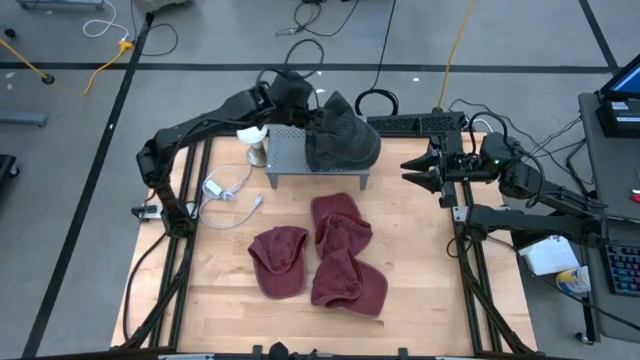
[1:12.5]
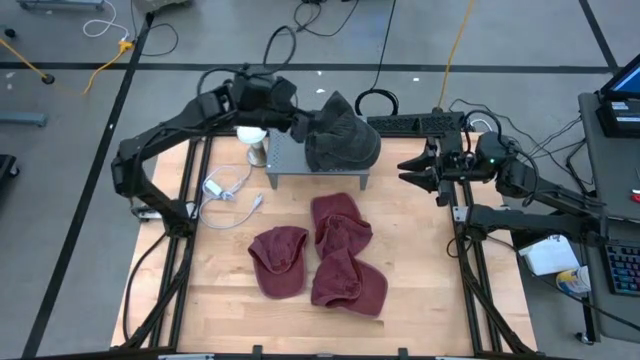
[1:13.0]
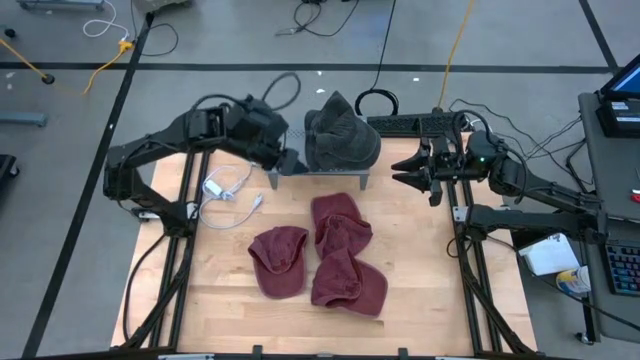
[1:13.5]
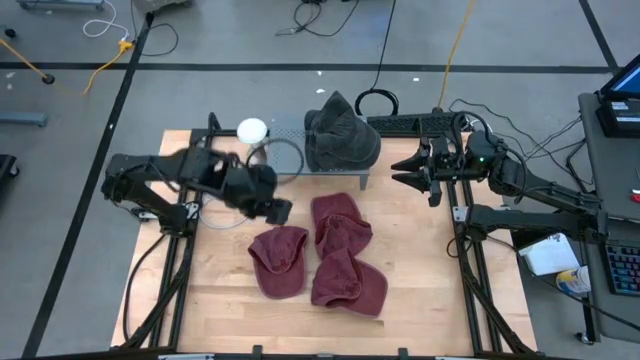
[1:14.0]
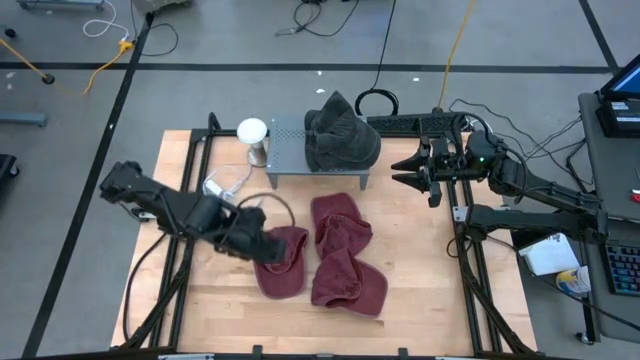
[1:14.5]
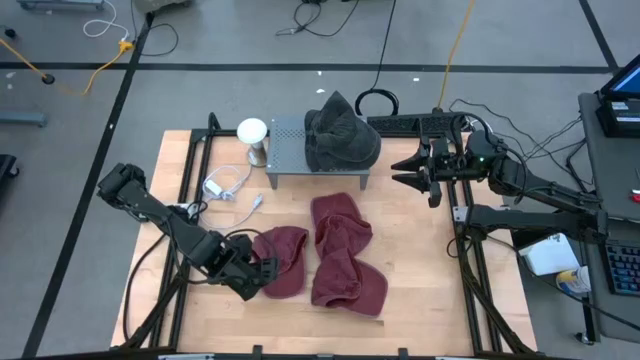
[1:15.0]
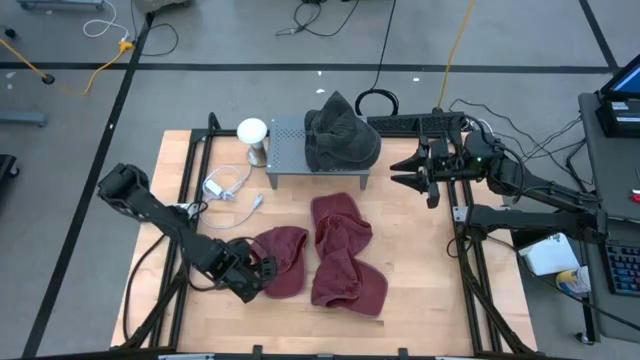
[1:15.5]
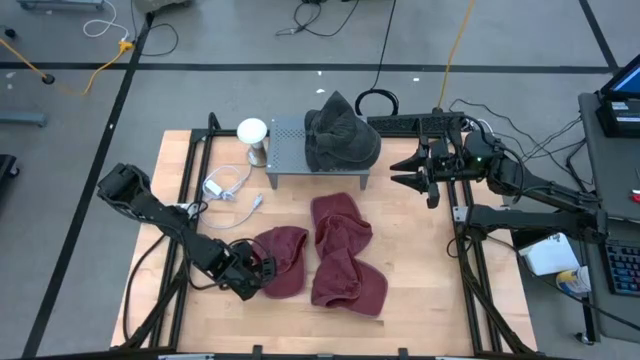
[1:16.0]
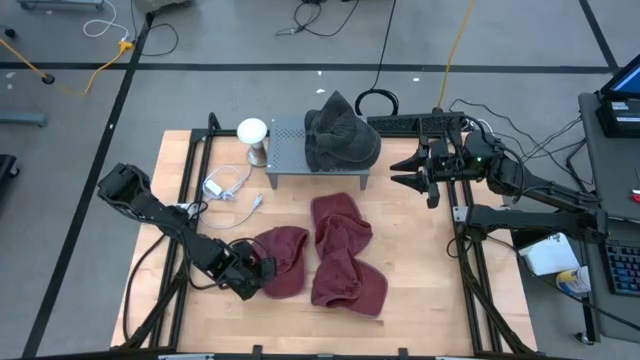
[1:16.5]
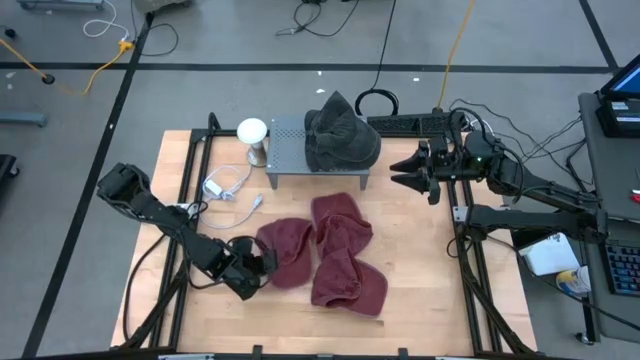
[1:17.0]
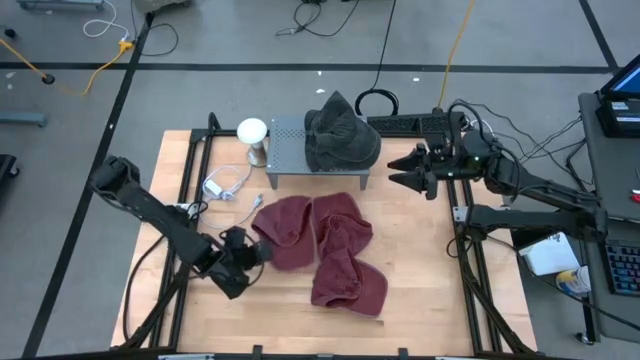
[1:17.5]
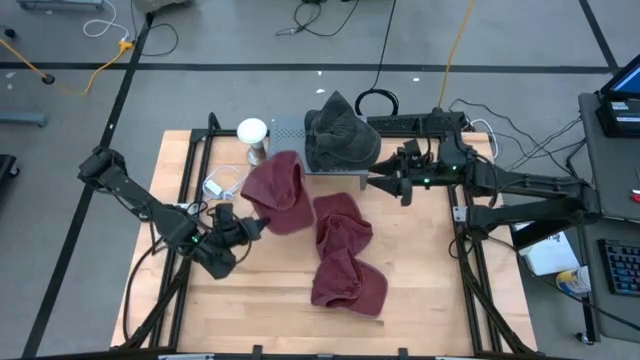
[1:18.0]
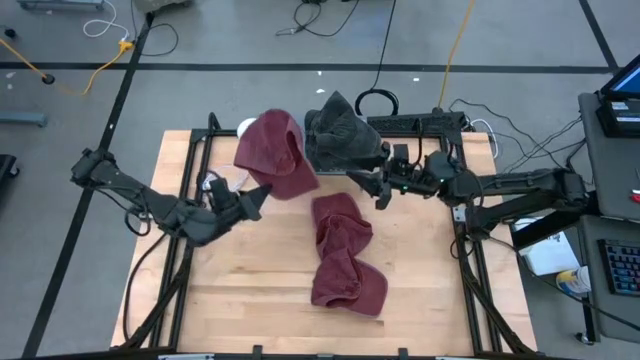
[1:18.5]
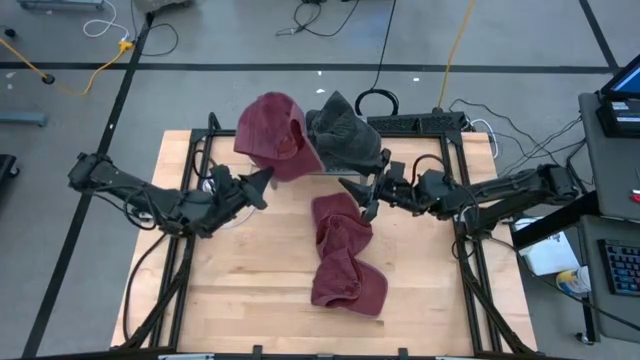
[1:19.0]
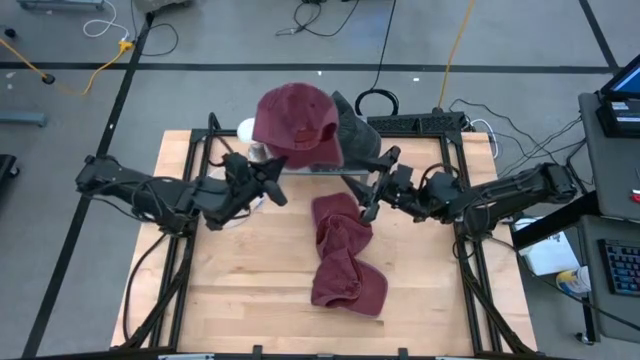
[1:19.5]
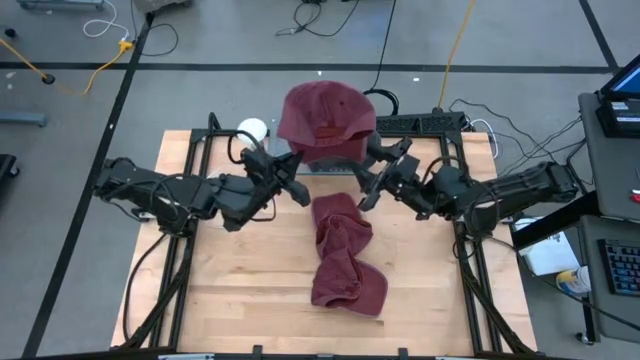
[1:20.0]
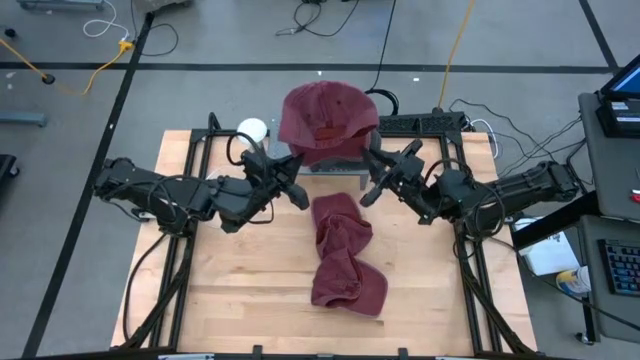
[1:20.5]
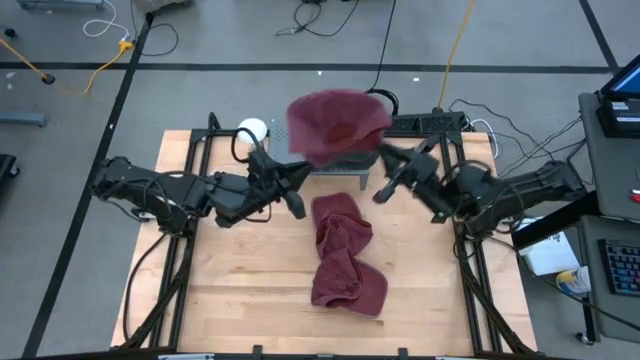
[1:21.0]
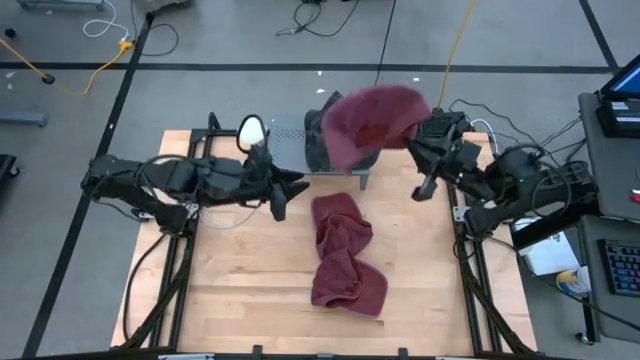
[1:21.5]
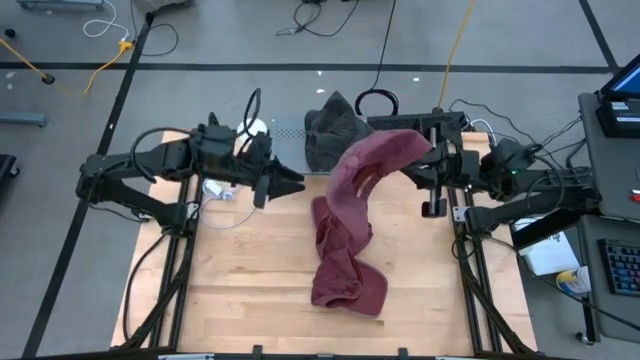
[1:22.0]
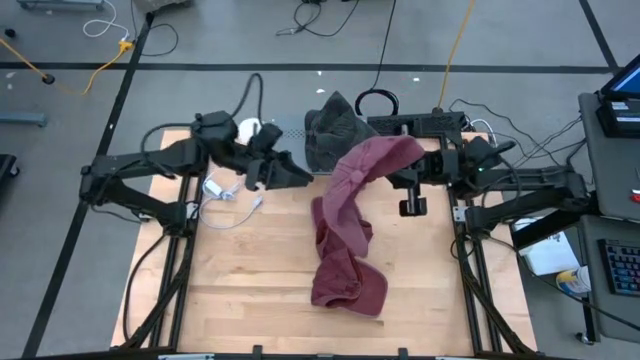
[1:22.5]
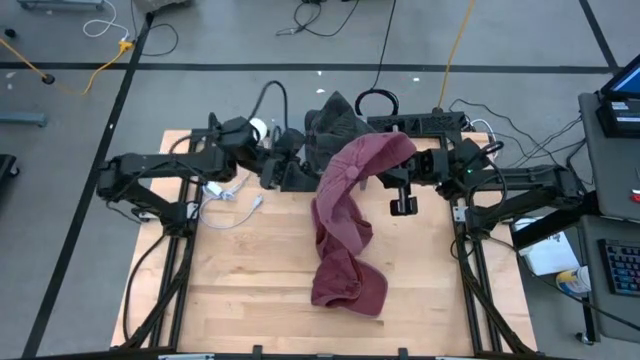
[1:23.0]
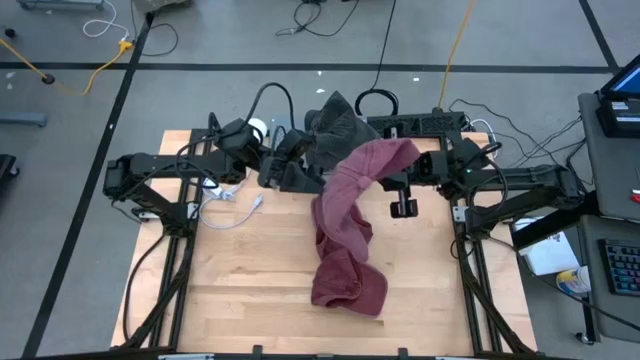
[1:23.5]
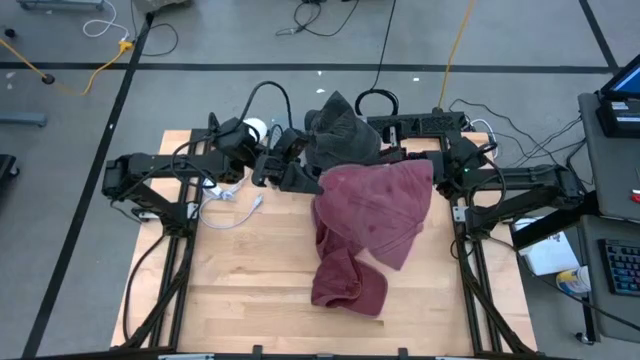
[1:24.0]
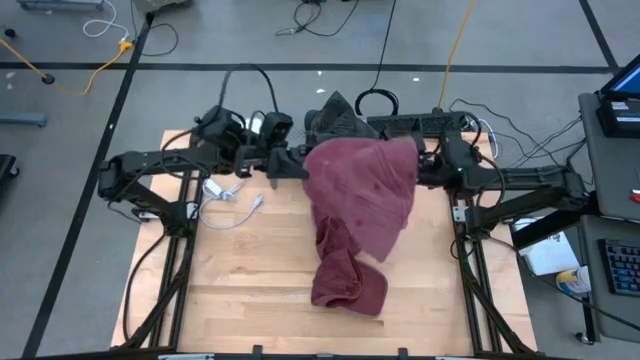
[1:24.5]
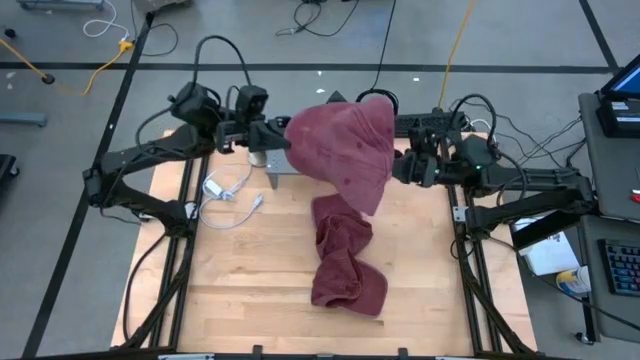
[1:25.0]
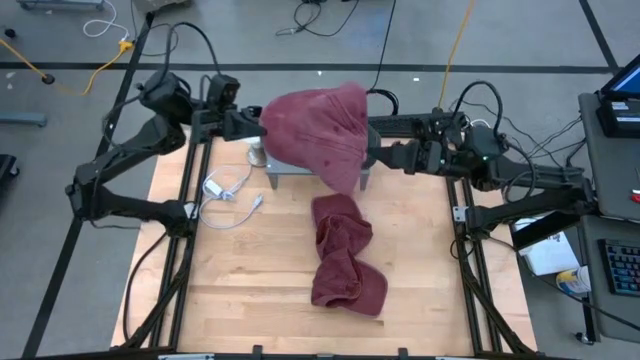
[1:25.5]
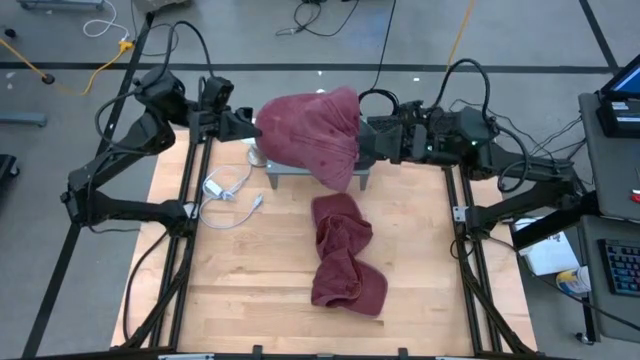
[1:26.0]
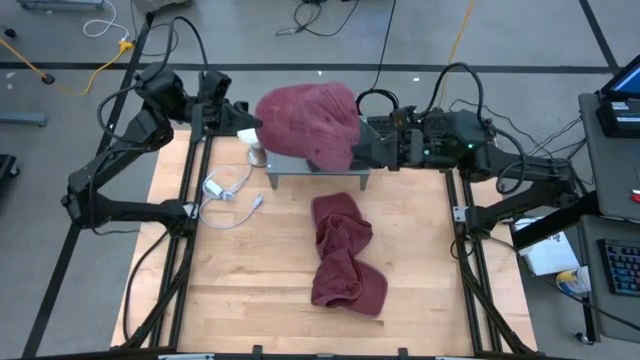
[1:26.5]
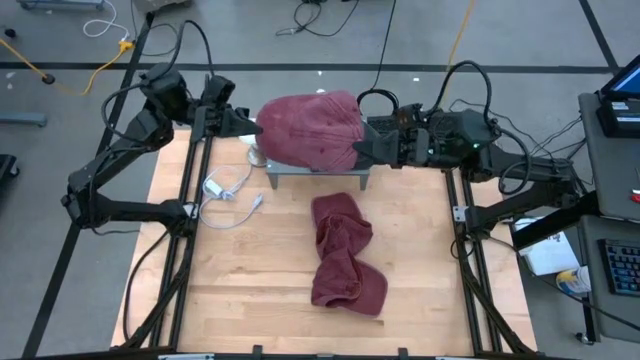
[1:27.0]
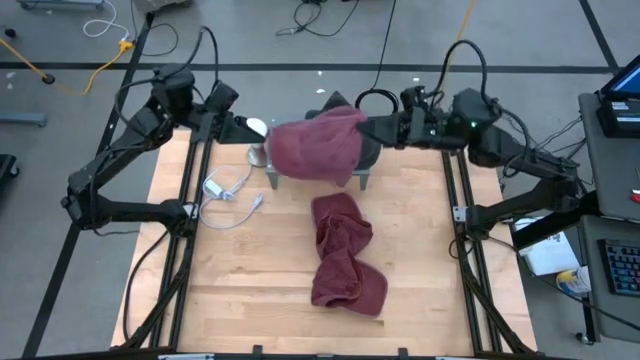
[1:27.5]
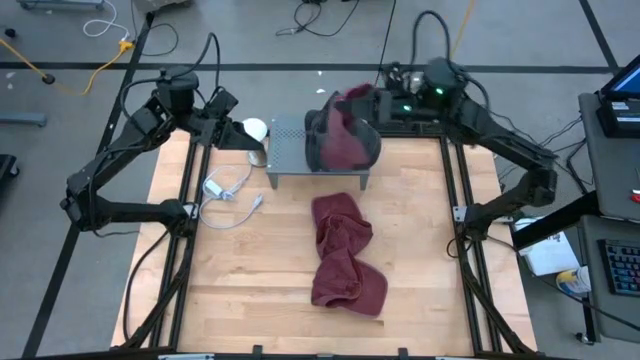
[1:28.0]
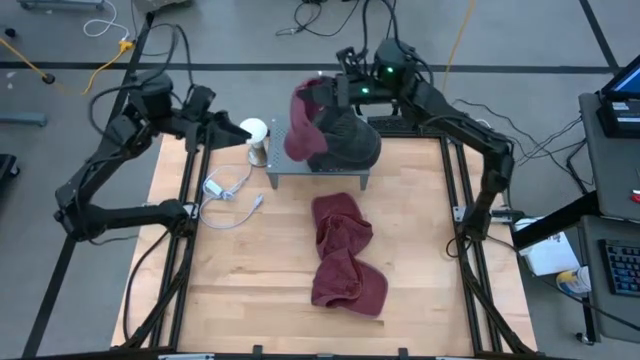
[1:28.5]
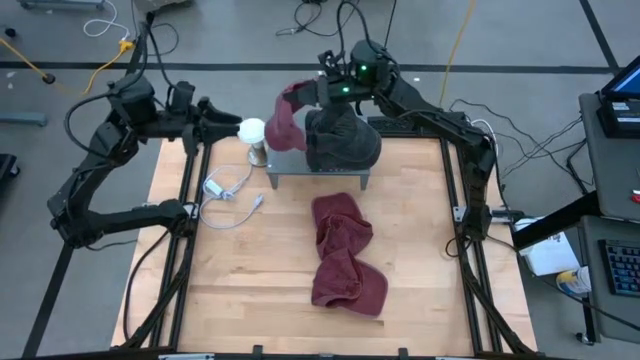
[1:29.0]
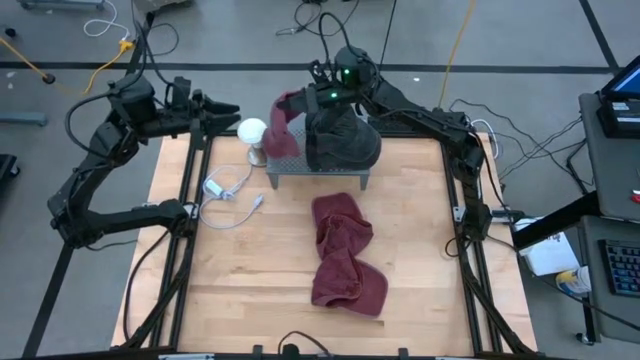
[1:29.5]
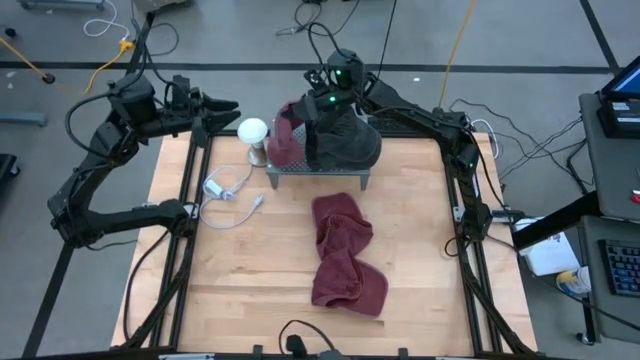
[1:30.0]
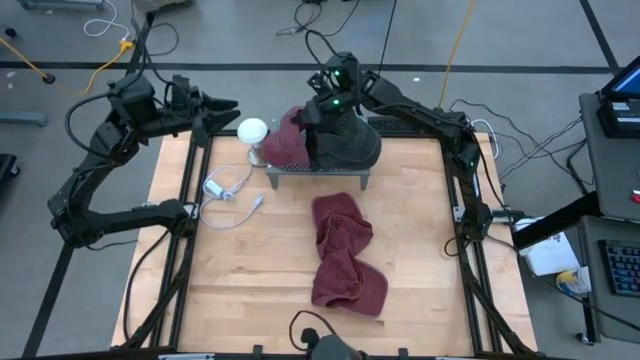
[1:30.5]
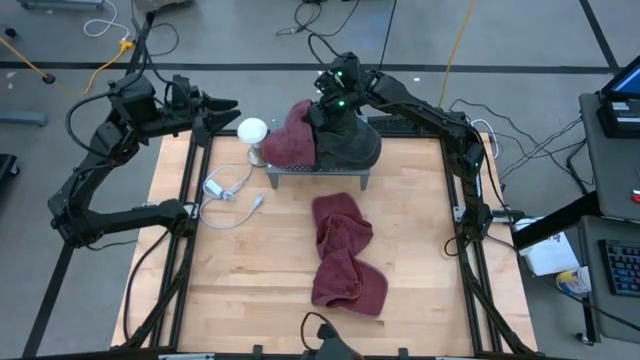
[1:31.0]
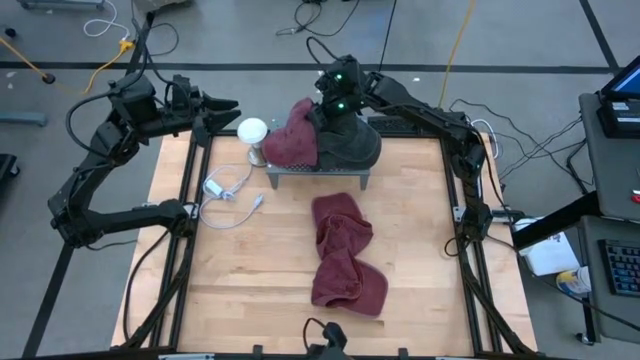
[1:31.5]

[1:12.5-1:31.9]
Task: Pick & Place hat
Put the left red cap on the shelf

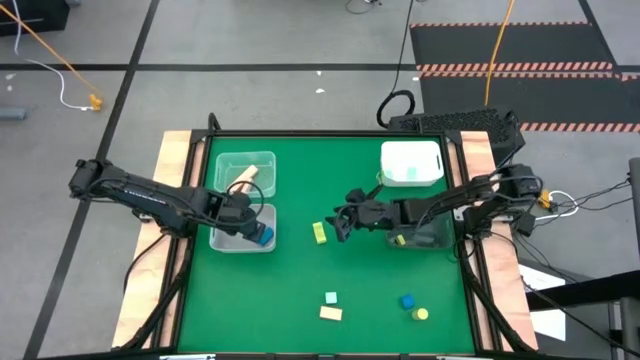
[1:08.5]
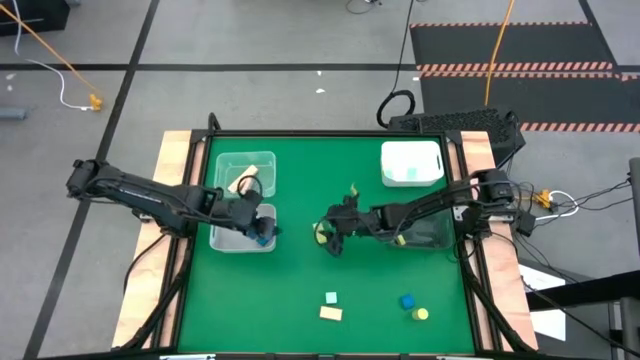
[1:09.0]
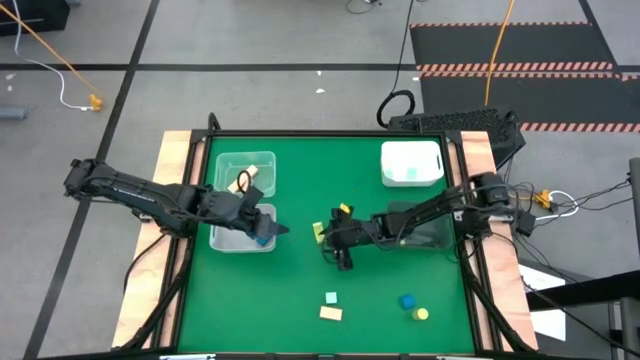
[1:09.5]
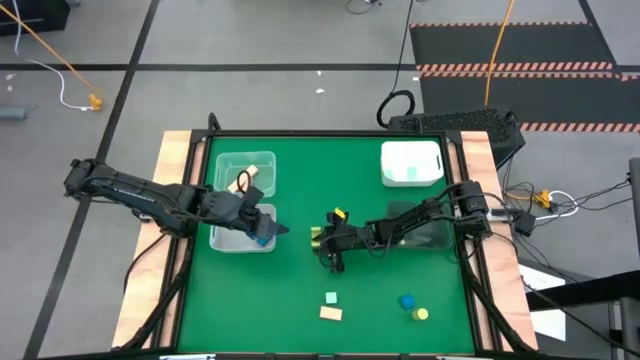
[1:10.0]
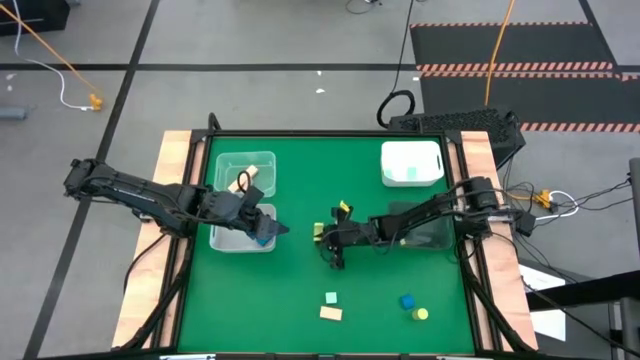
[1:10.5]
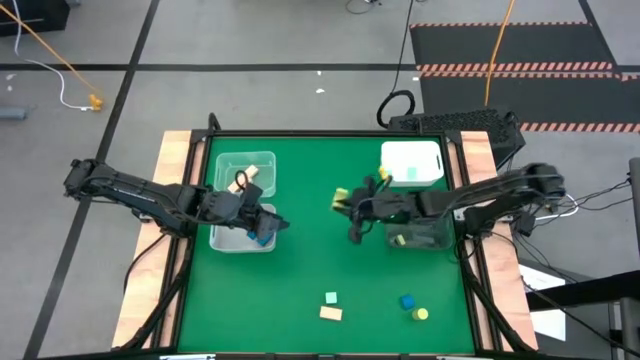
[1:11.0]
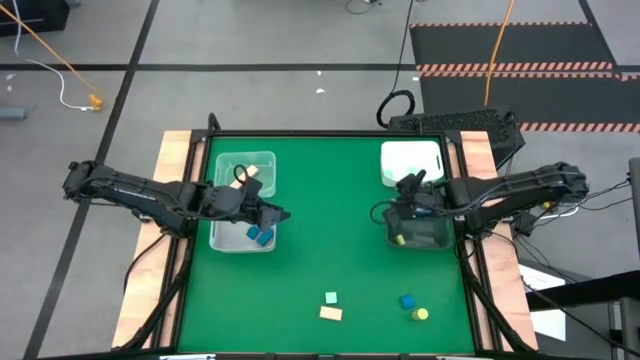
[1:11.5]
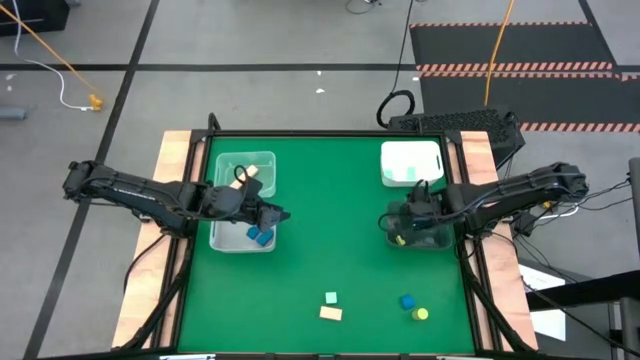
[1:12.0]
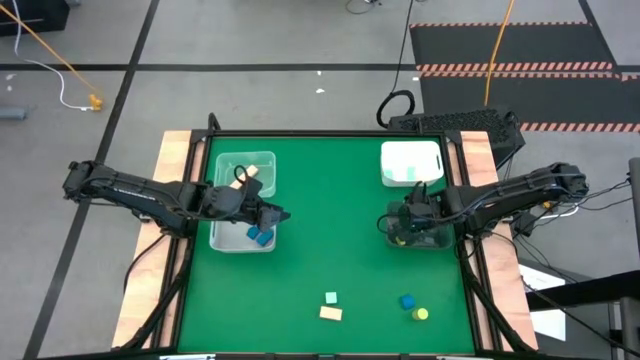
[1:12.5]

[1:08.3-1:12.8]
Task: Sort & place blocks by color
Put the top yellow block into the black bin
